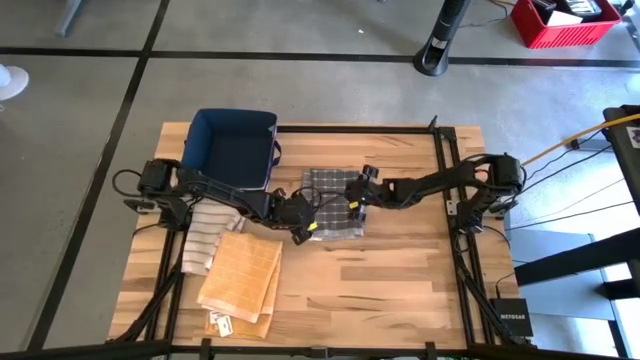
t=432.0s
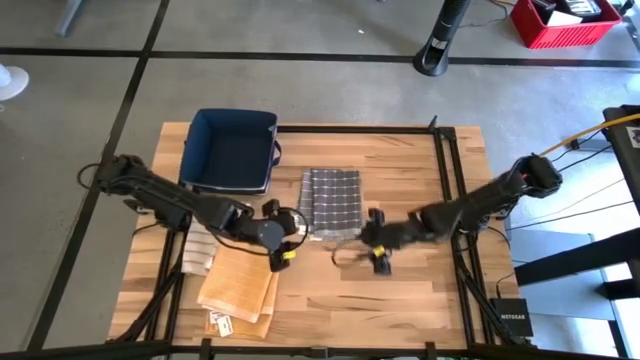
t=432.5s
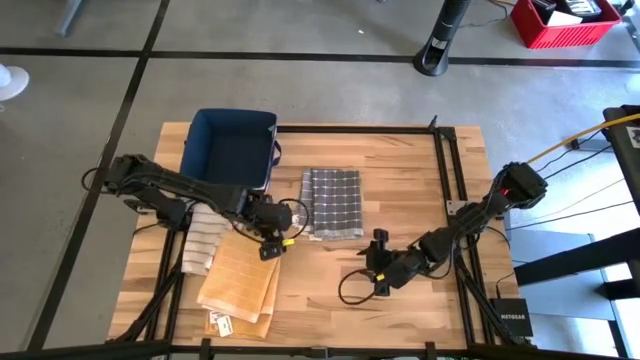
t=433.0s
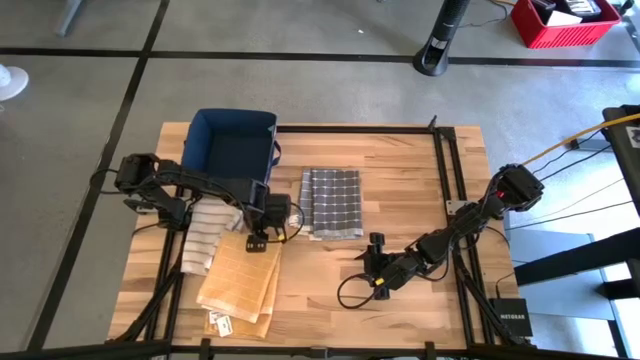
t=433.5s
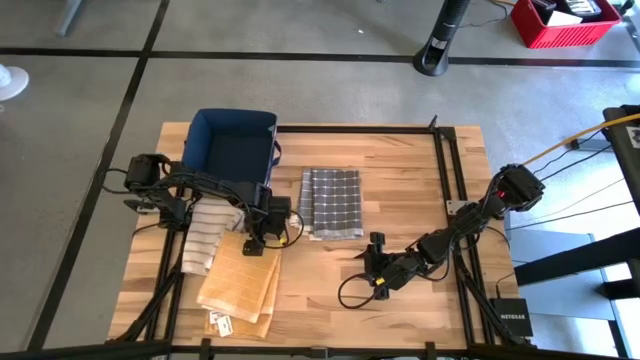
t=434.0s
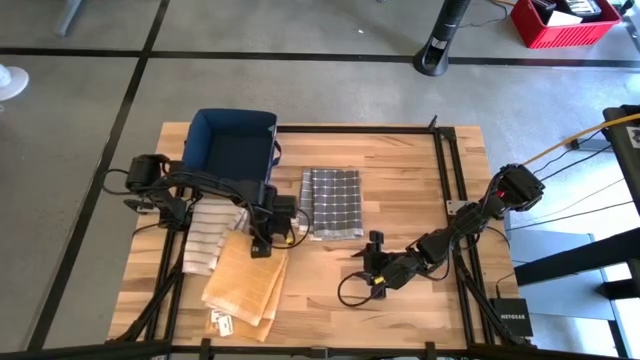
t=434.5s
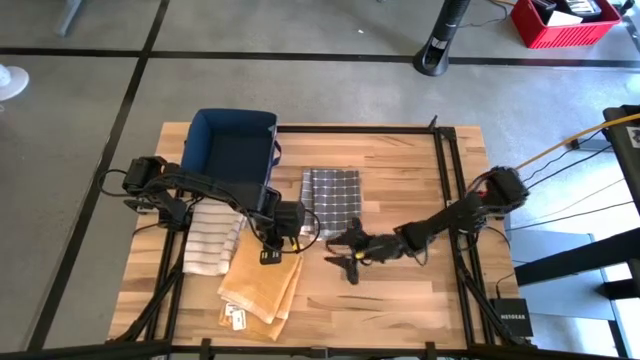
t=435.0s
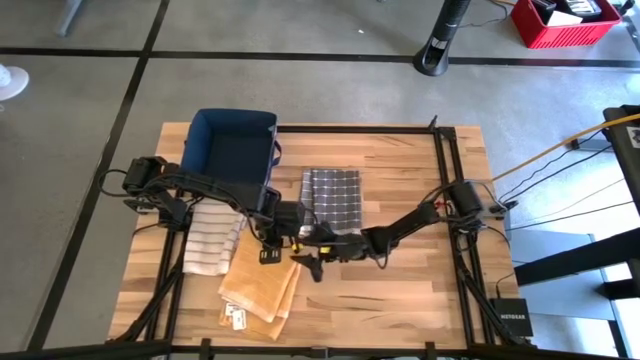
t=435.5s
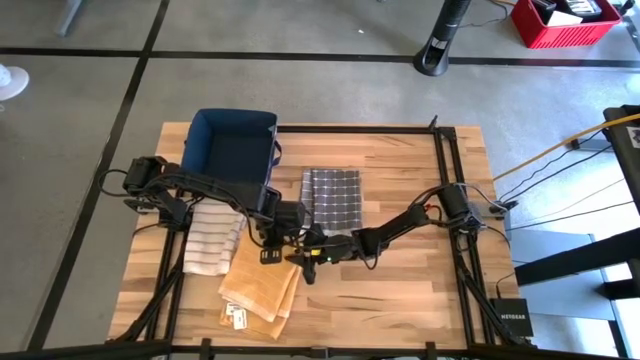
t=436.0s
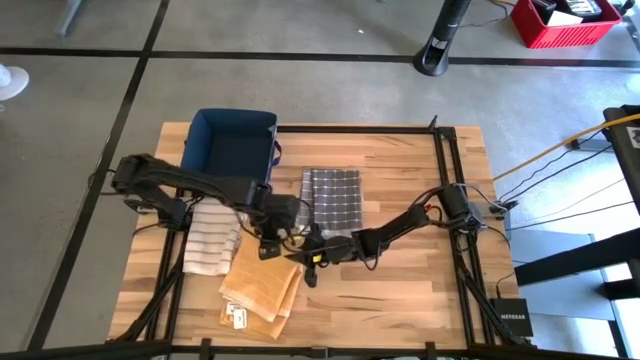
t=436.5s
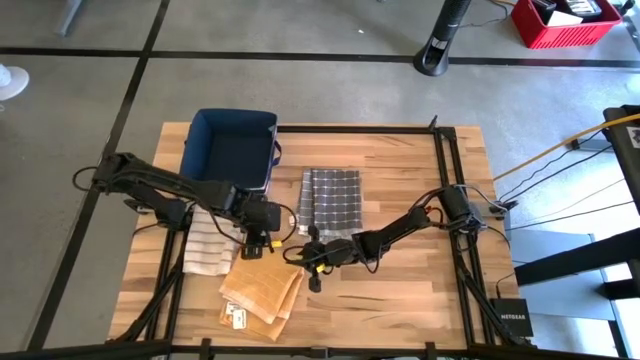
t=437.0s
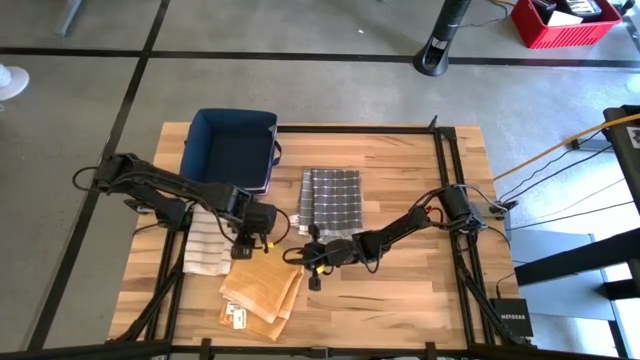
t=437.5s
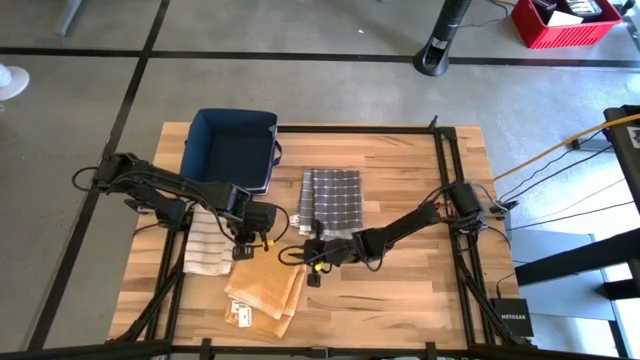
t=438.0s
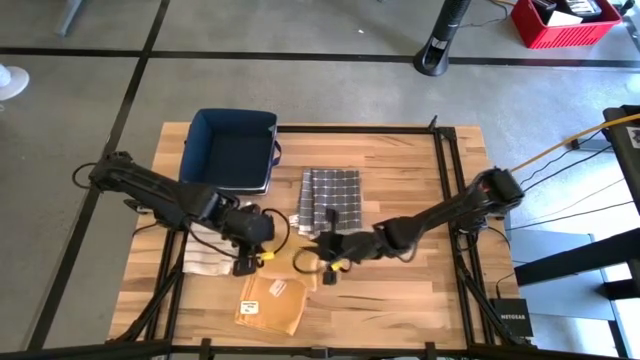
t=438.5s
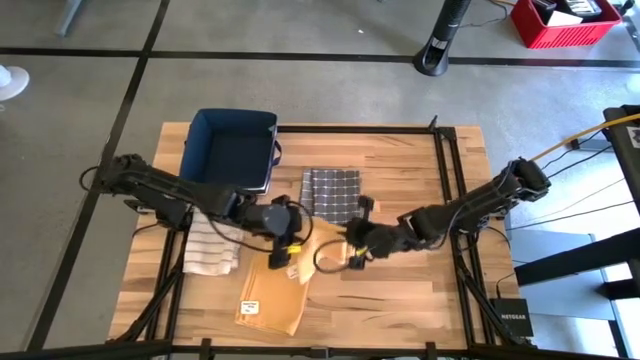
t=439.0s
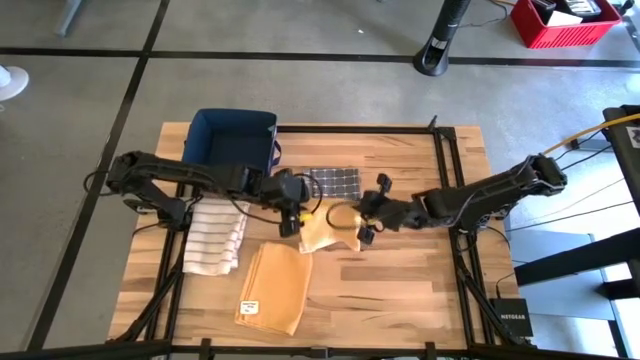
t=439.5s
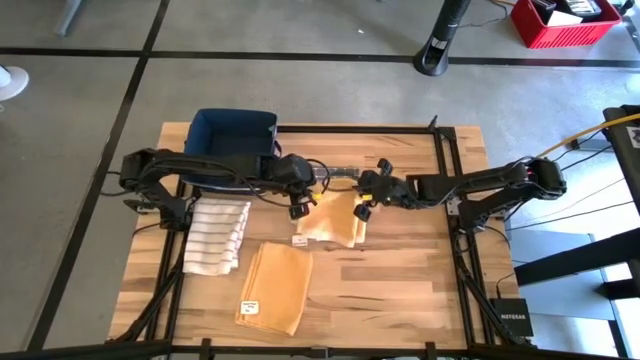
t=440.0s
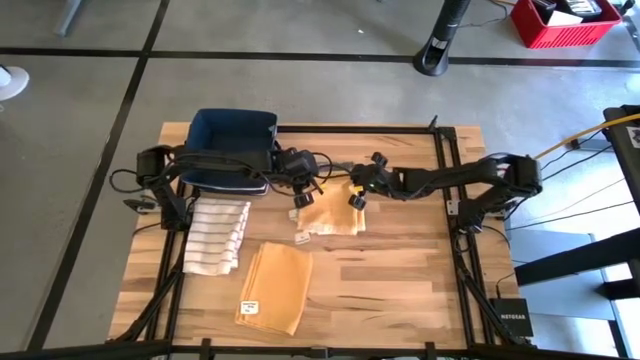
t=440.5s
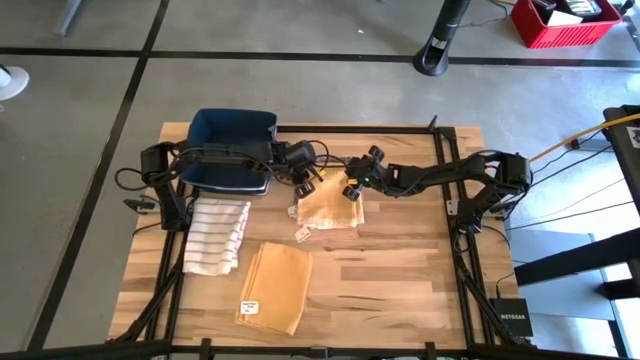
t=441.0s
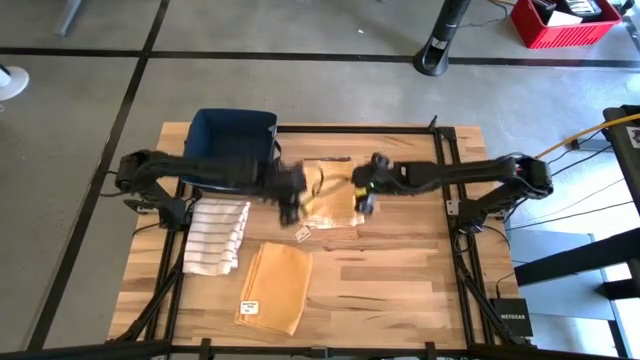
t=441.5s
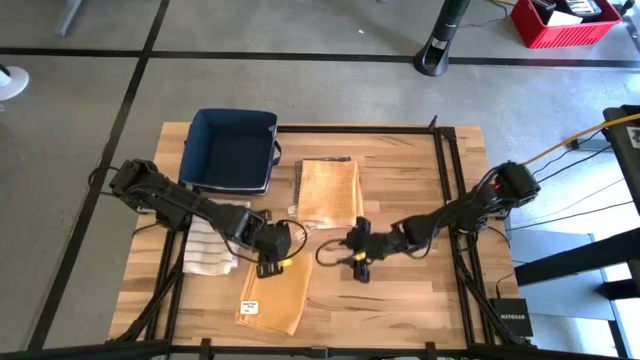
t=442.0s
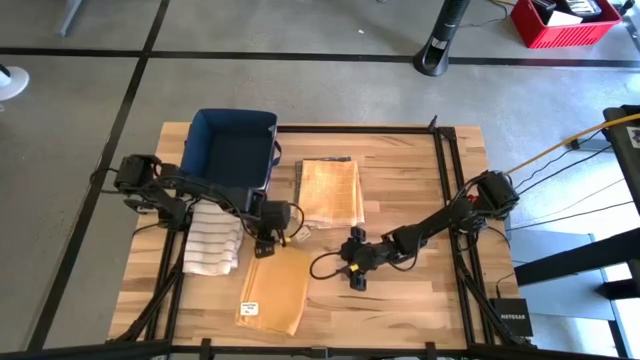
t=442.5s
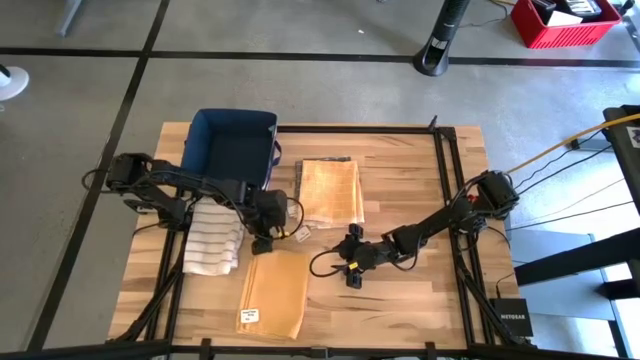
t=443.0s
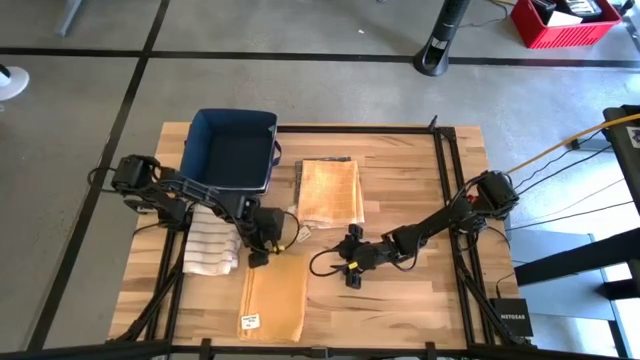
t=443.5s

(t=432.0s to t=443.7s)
Task: Fold towel
Stack the orange pattern towel on top of the gray pattern towel

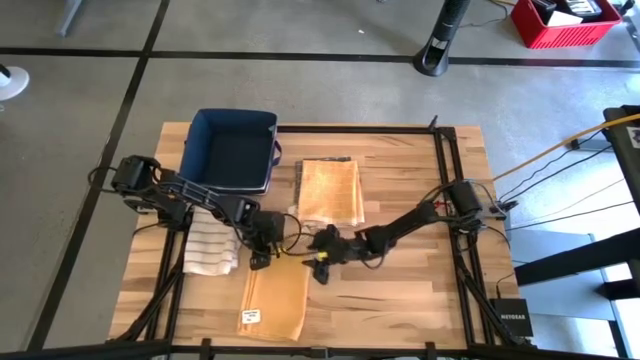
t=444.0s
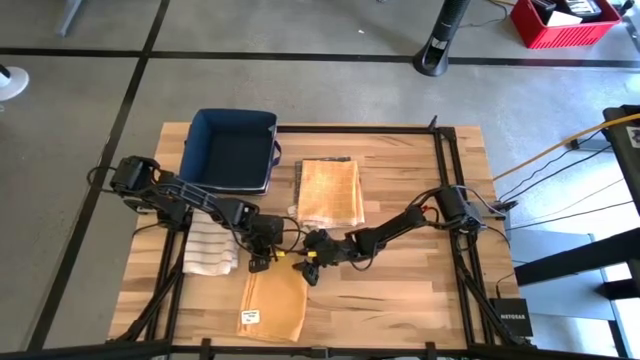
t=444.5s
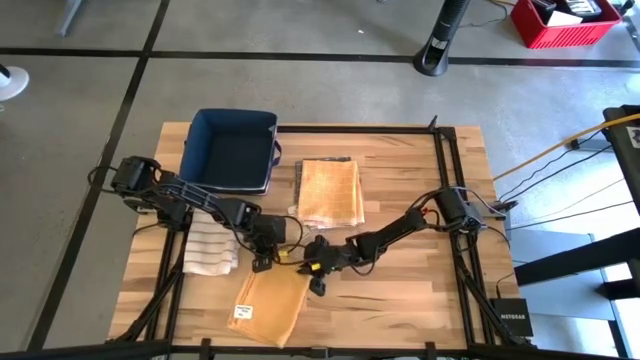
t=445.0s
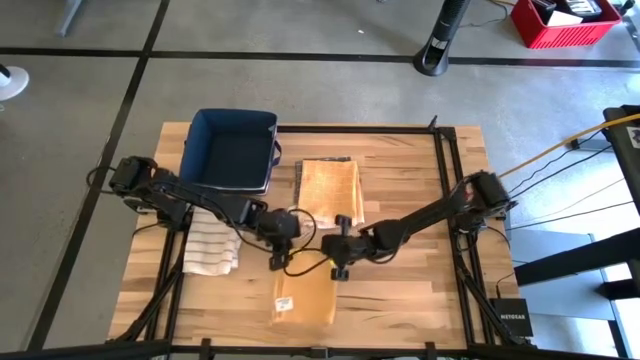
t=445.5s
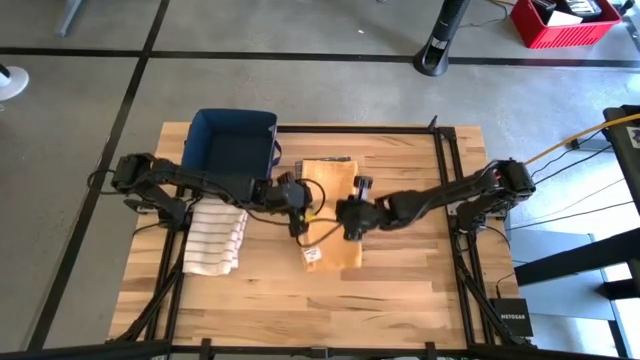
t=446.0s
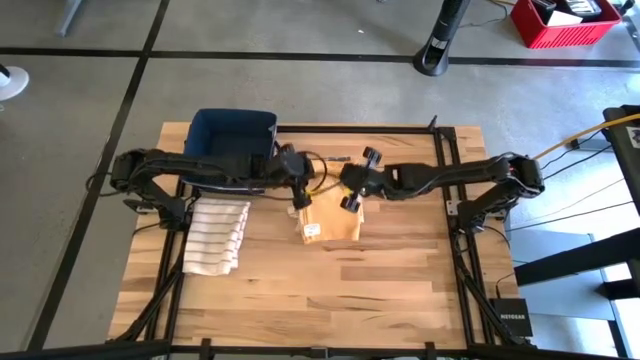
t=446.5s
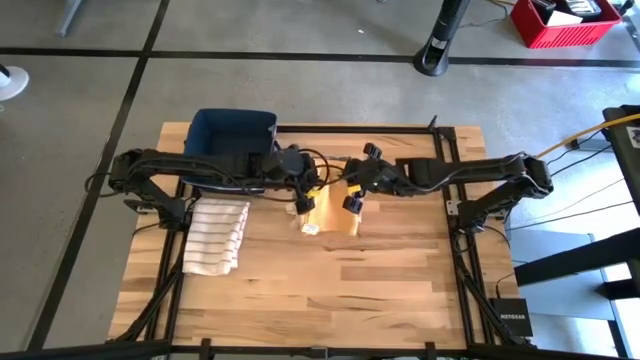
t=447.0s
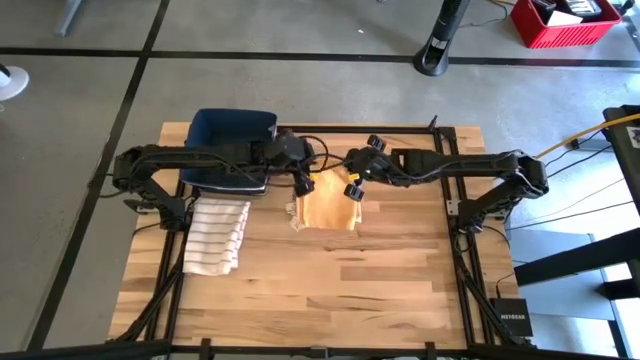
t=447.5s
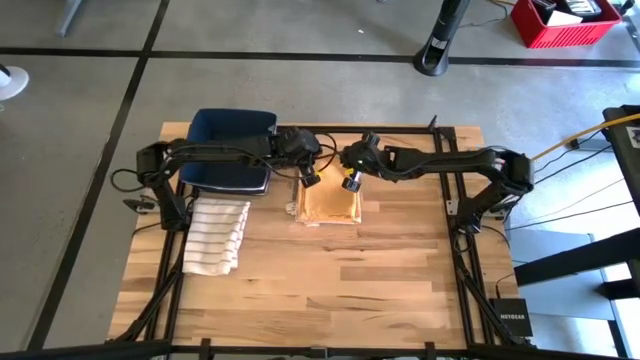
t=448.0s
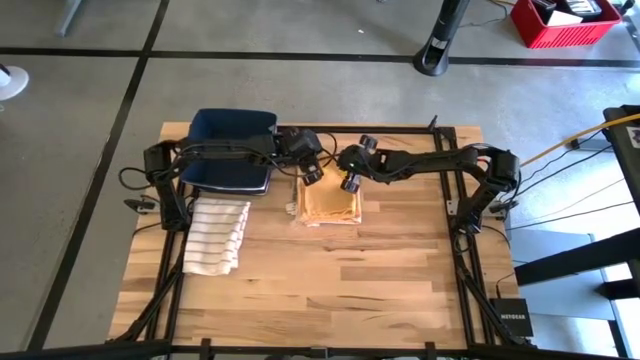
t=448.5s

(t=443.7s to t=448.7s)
Stack the orange towel on top of the orange pattern towel

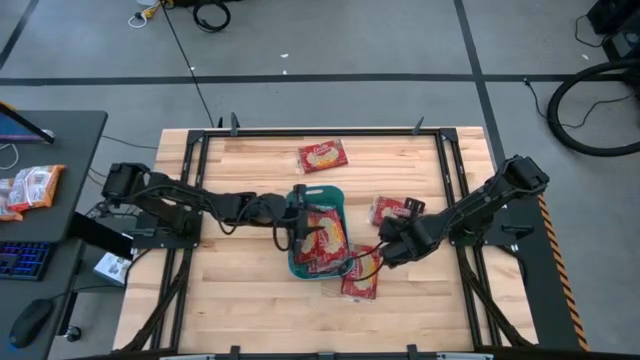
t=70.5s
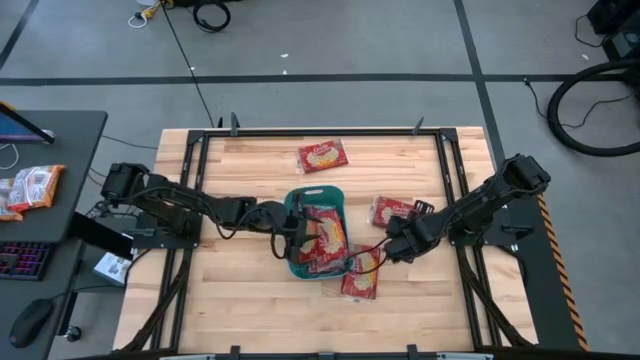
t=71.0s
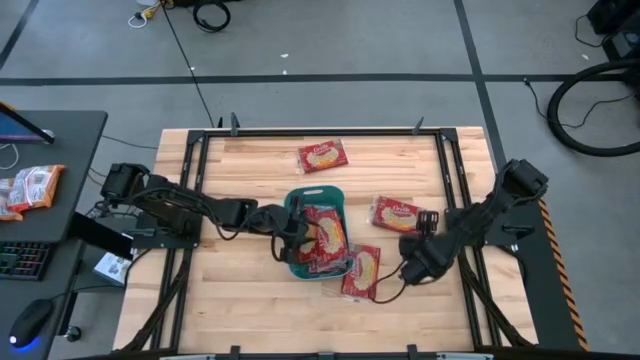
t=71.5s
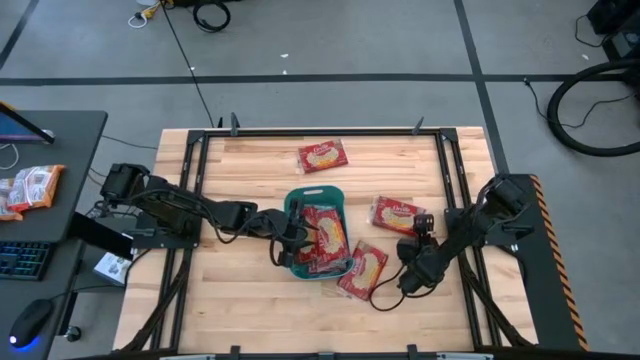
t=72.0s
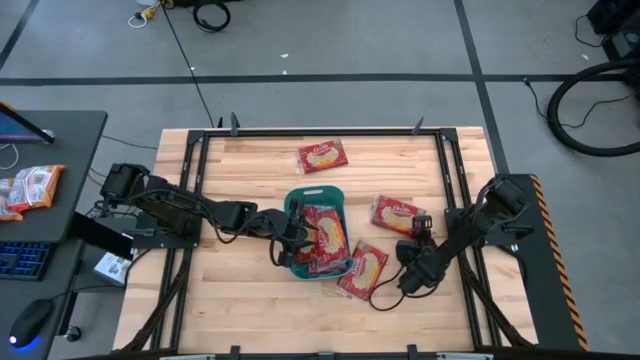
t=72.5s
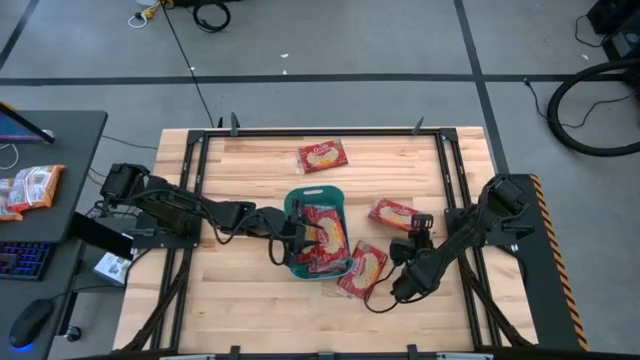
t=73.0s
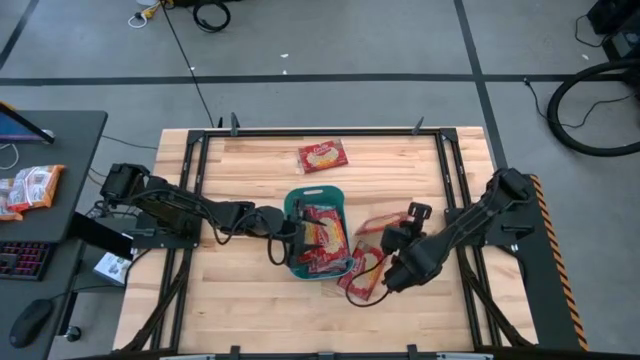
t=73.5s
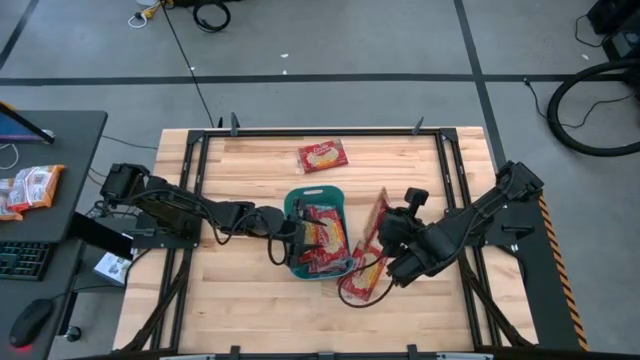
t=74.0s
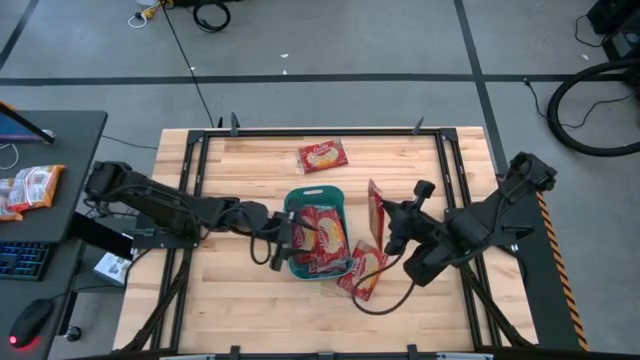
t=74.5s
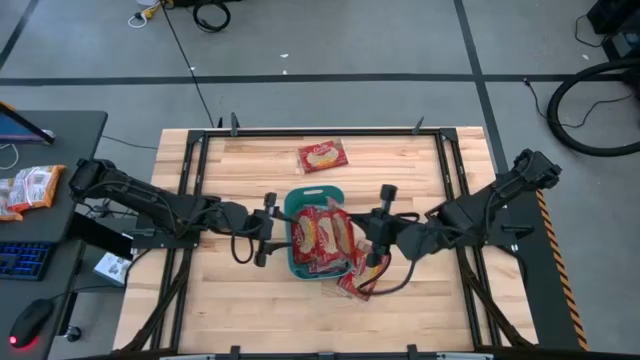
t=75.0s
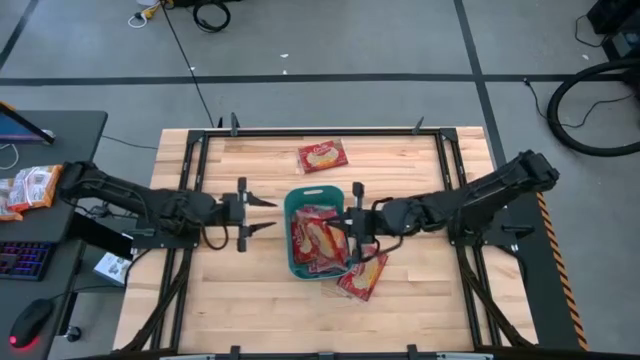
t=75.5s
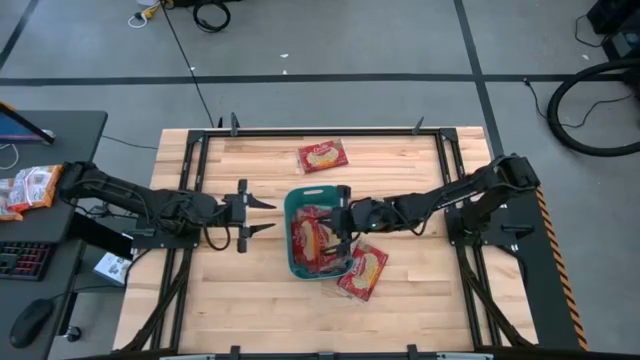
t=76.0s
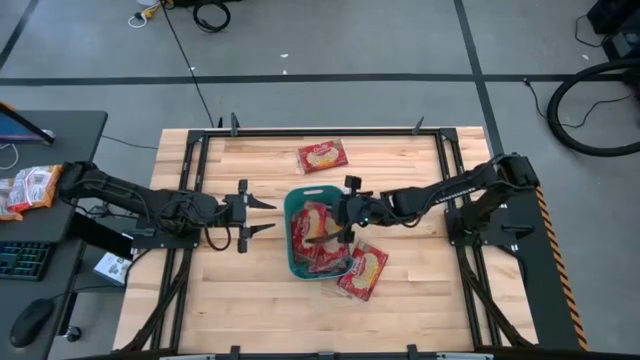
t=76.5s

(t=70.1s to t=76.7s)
Task: Sort popcorn bags into baskets
Put the red popcorn bag into the green bin
